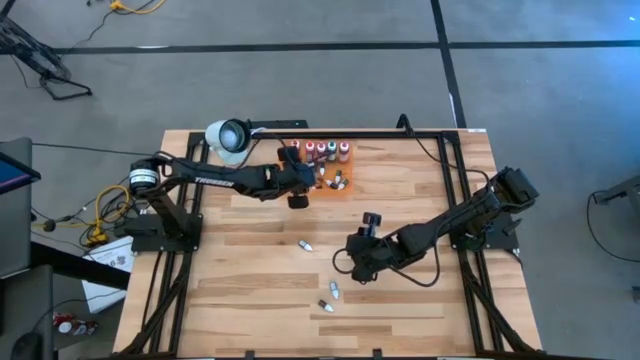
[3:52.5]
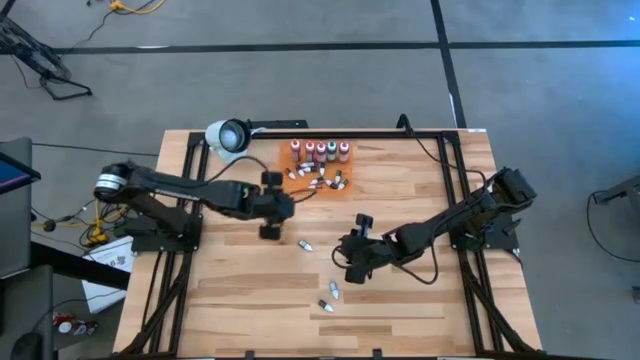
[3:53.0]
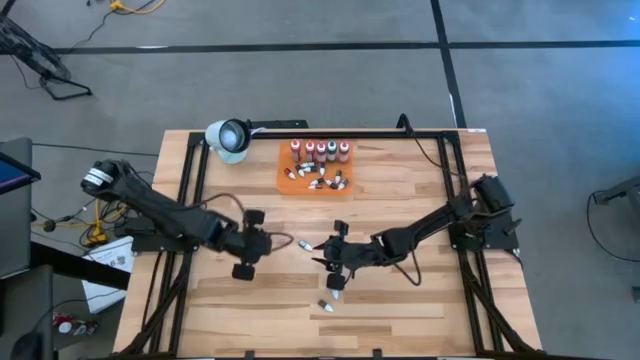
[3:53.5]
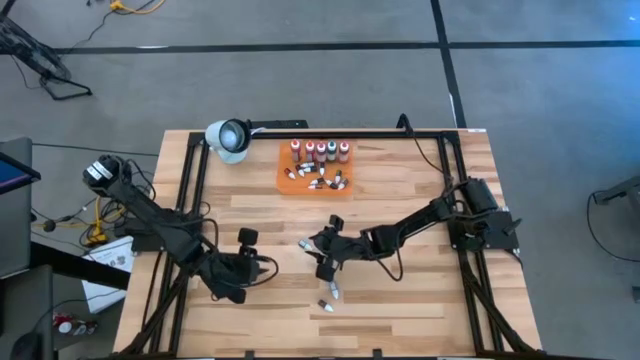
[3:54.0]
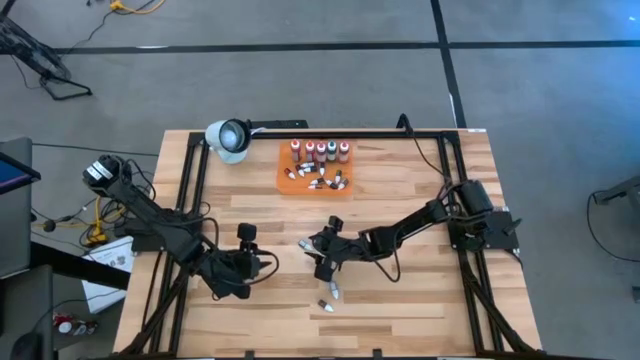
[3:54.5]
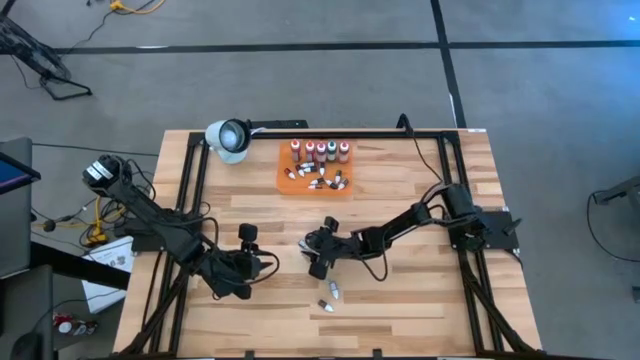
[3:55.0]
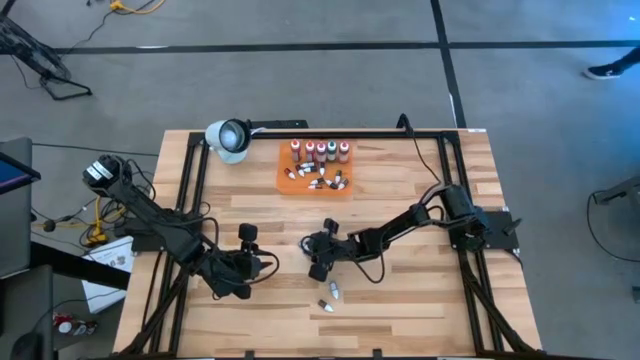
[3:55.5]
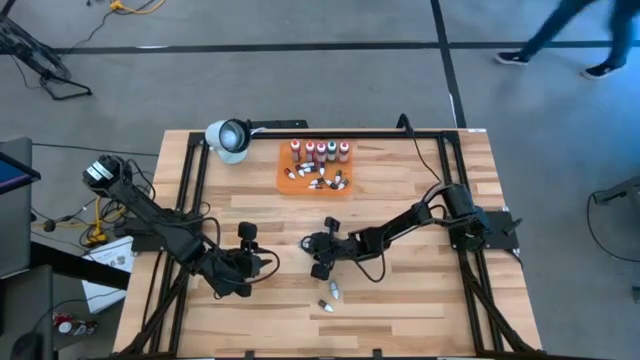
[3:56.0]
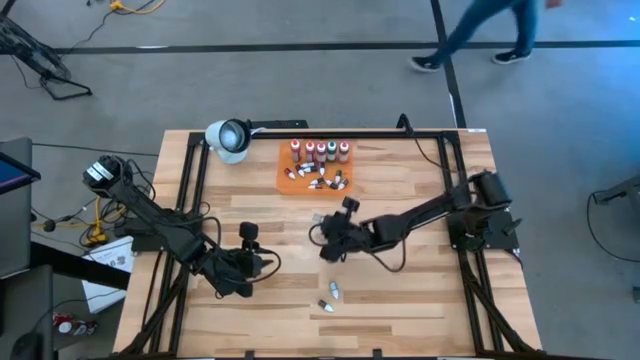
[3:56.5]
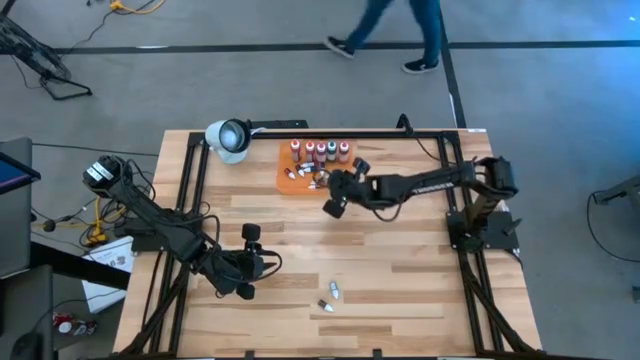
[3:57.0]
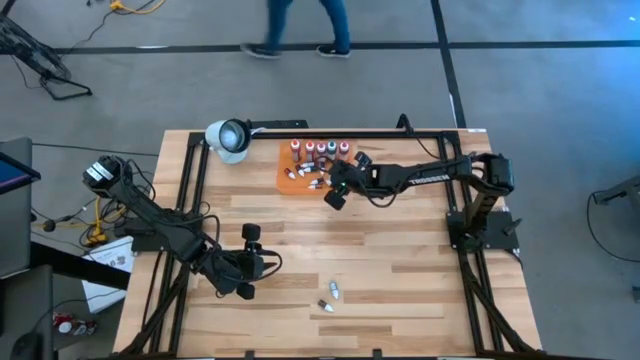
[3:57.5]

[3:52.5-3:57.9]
Task: Pick & Place food coloring
Put the small green food coloring bottle into the orange bin

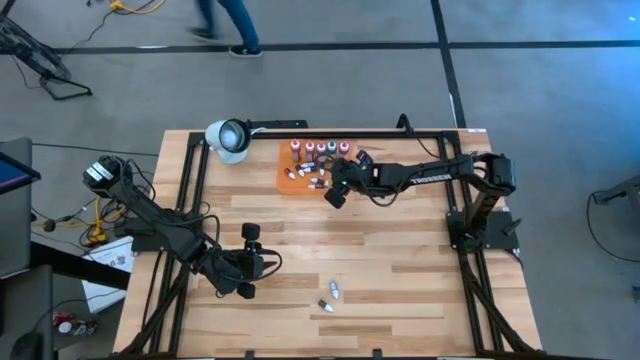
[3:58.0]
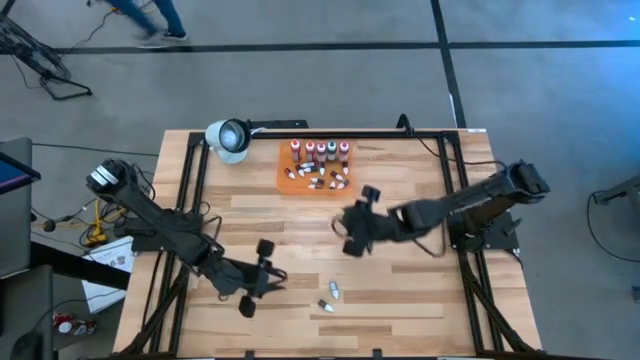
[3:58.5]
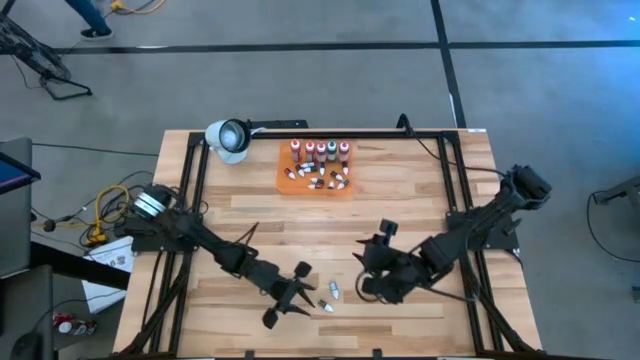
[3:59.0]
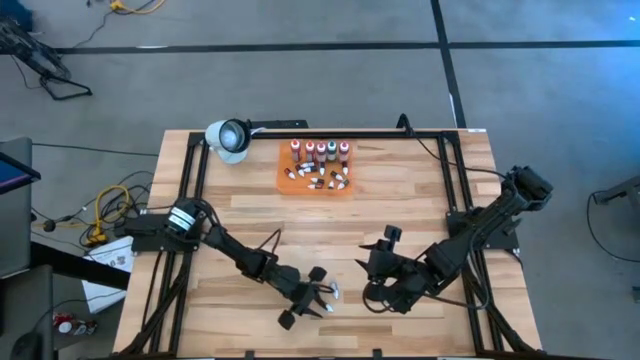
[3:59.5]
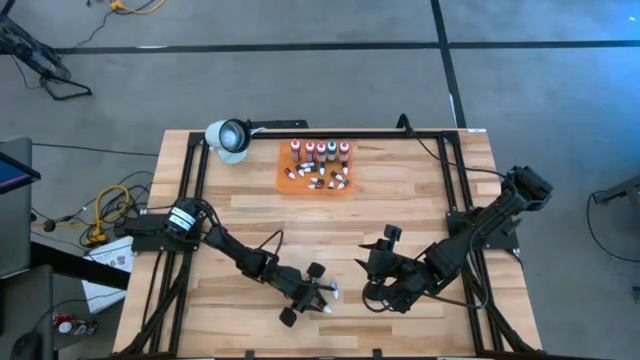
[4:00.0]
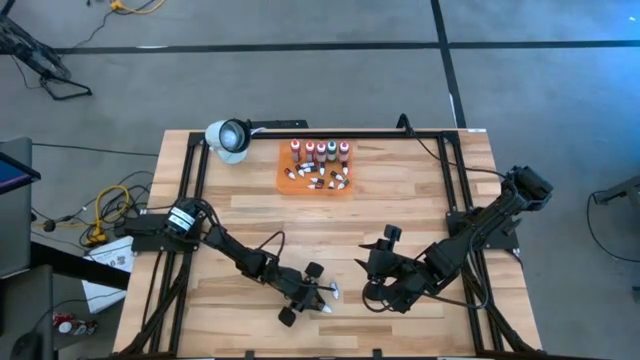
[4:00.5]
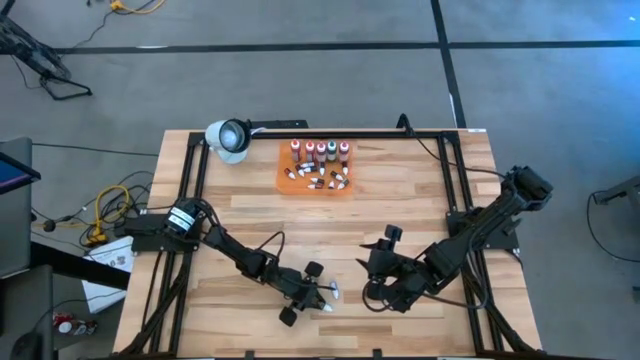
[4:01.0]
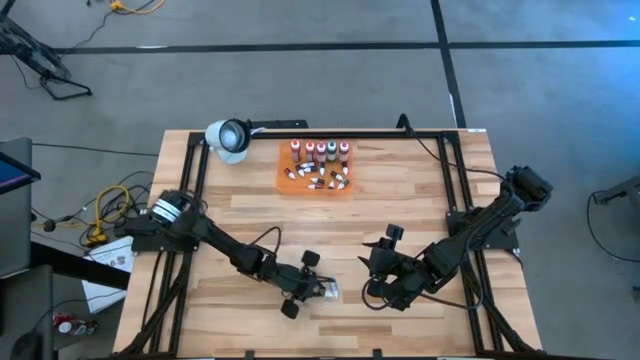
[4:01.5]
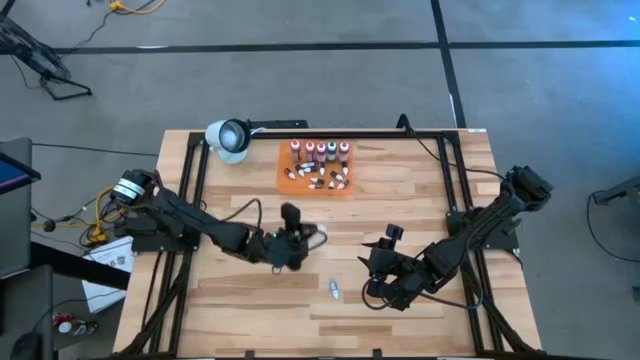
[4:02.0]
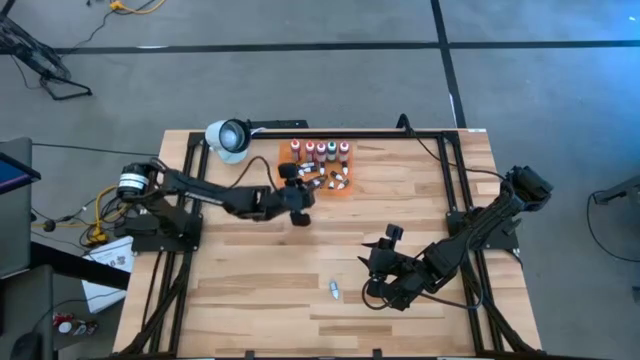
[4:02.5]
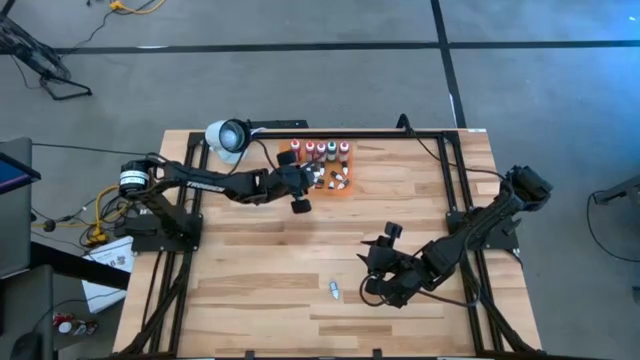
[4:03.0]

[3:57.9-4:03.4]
Put the small brown food coloring bottle into the orange bin

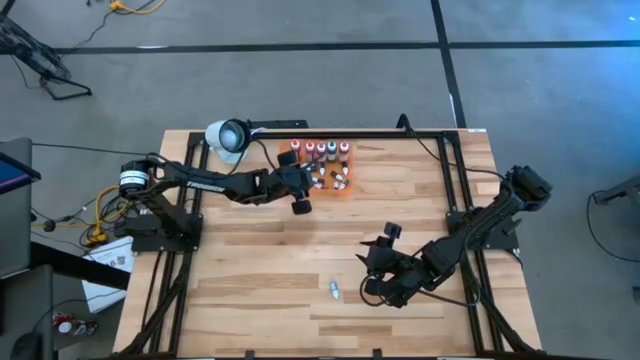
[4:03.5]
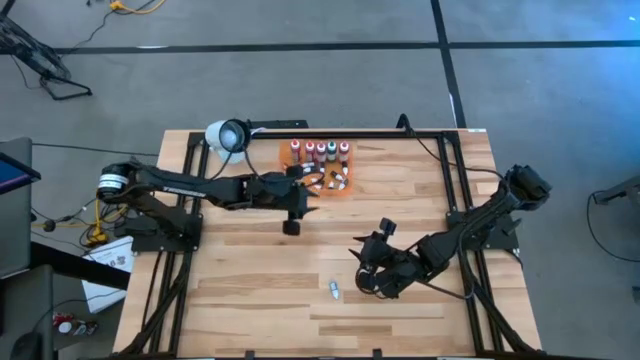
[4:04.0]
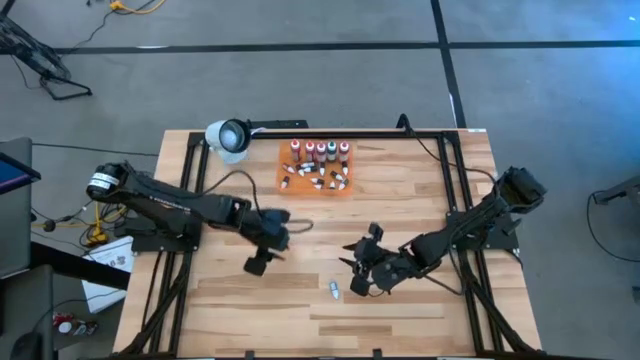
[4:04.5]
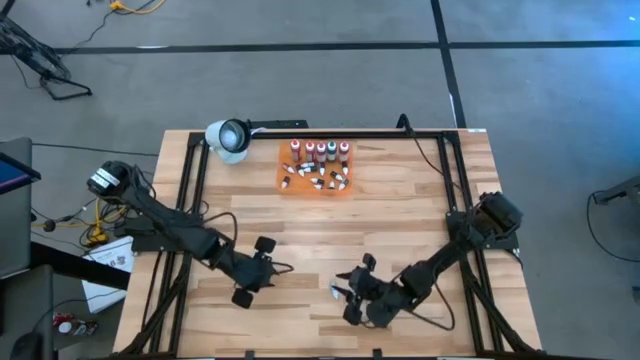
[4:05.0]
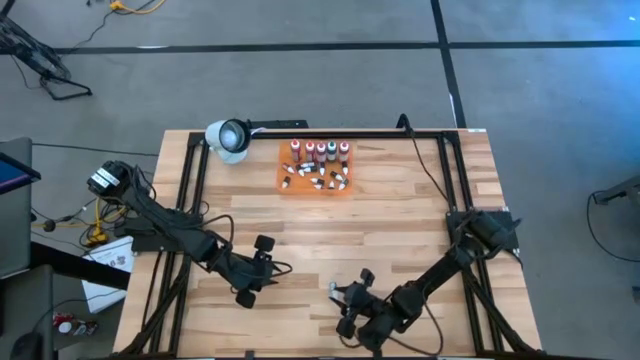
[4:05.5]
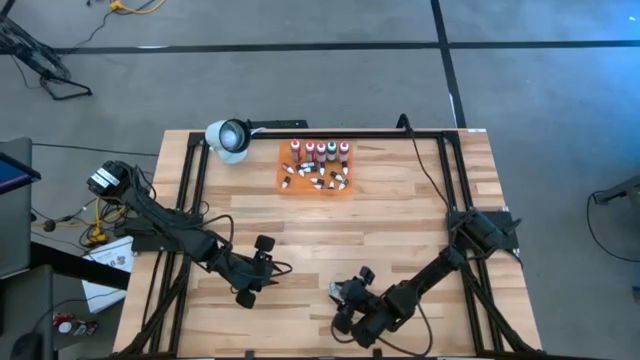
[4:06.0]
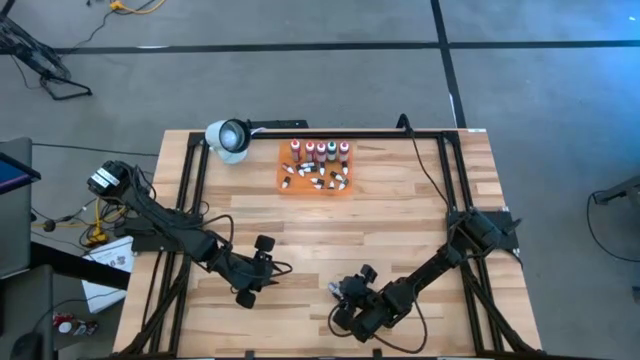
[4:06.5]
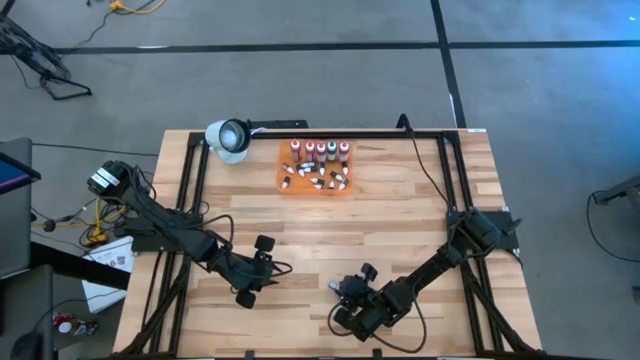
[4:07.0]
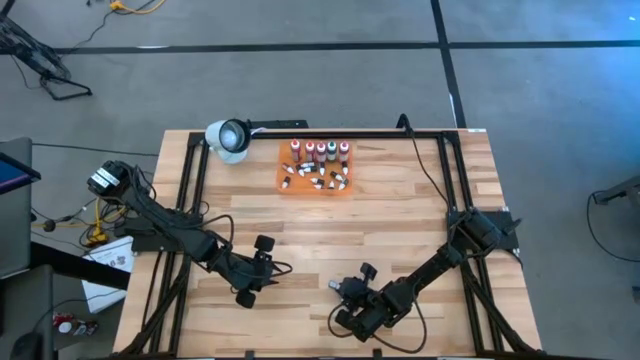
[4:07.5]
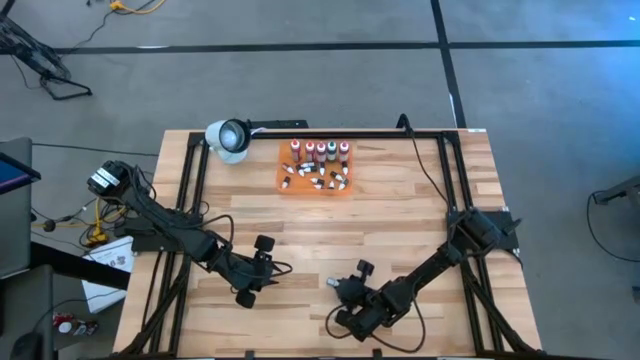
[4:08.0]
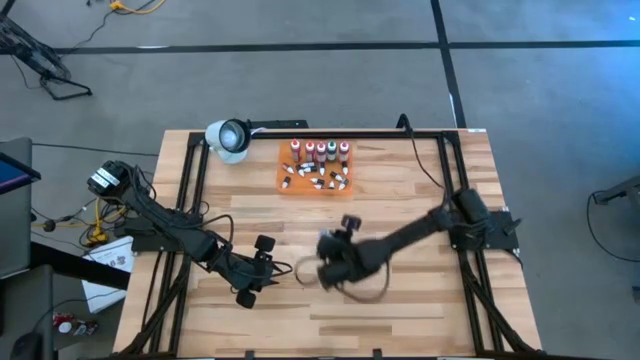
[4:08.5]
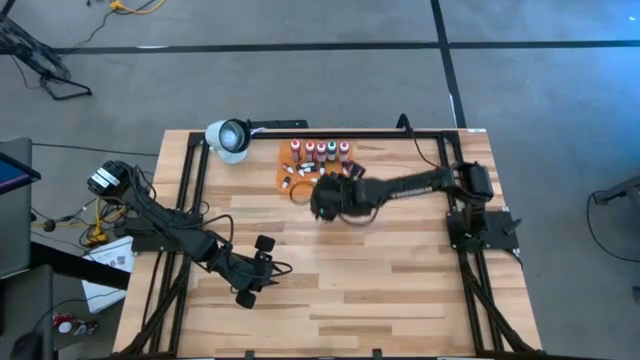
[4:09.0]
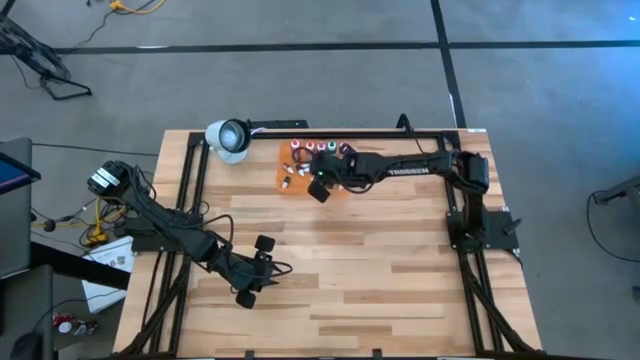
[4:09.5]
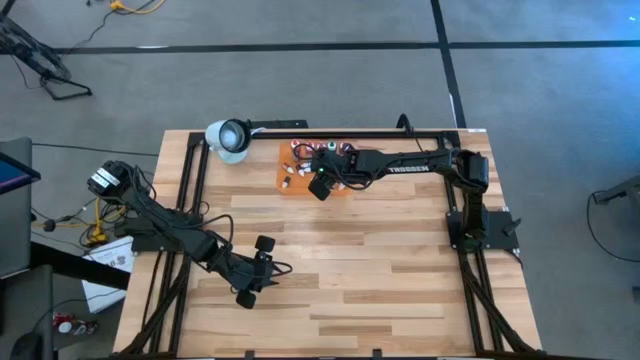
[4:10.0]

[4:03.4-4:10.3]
Put the small blue food coloring bottle into the orange bin

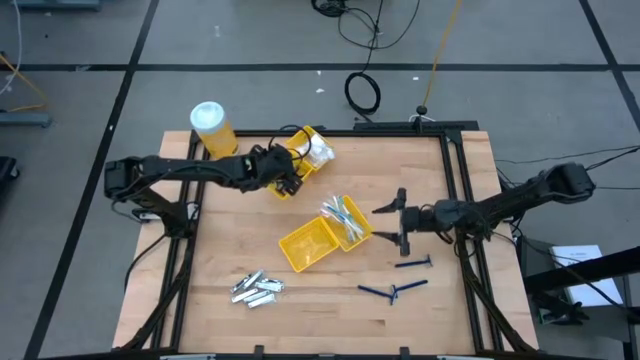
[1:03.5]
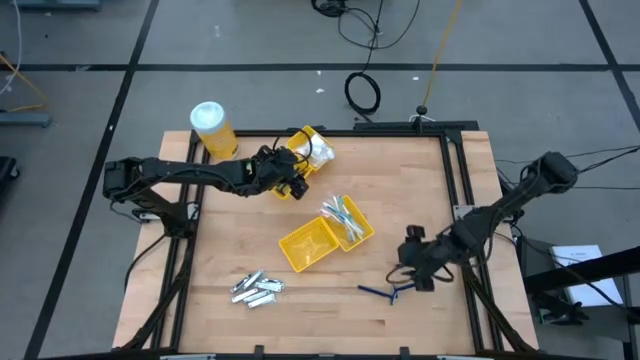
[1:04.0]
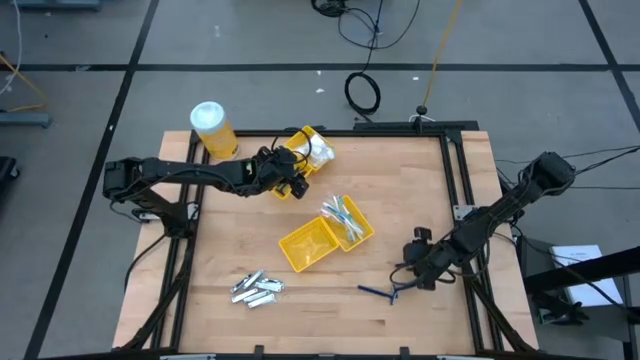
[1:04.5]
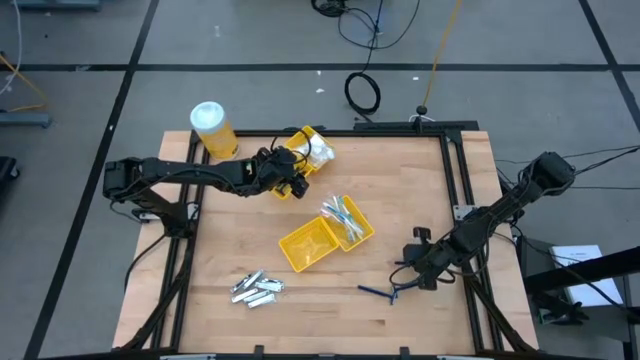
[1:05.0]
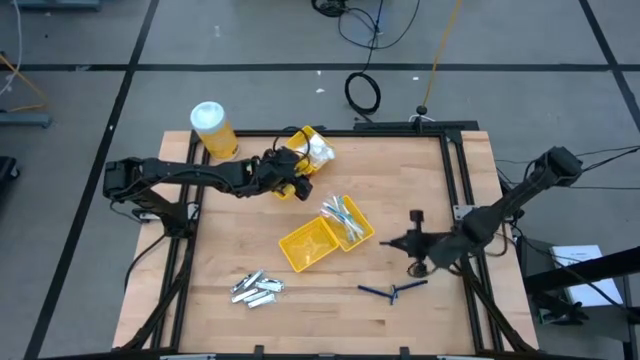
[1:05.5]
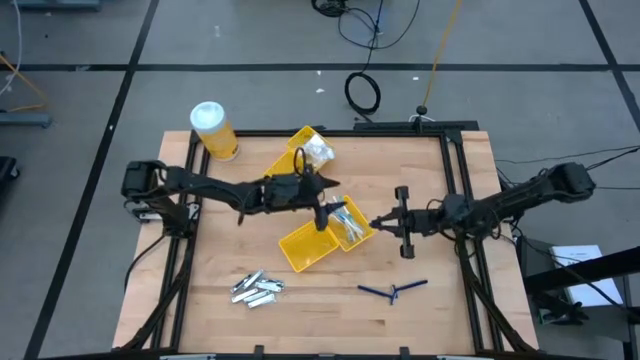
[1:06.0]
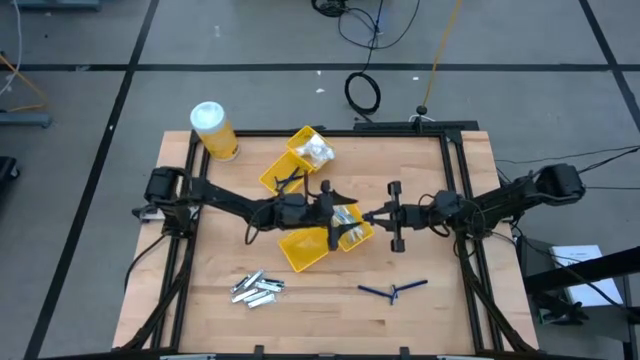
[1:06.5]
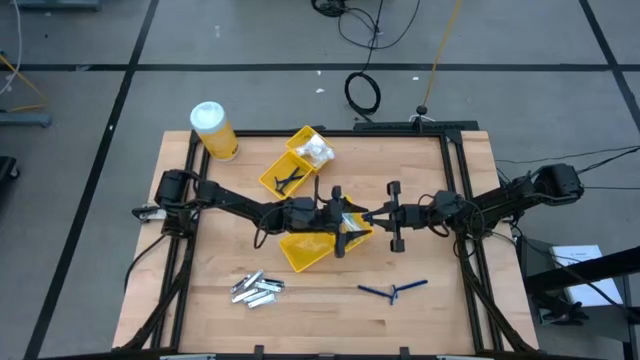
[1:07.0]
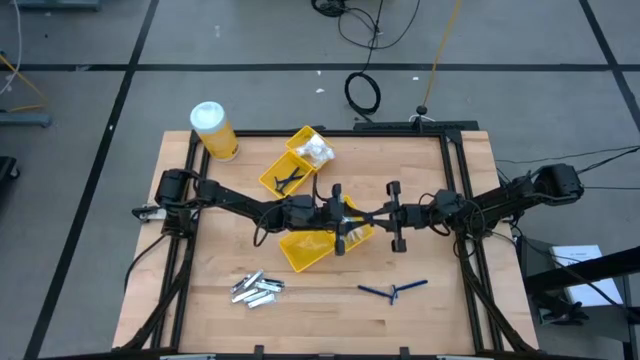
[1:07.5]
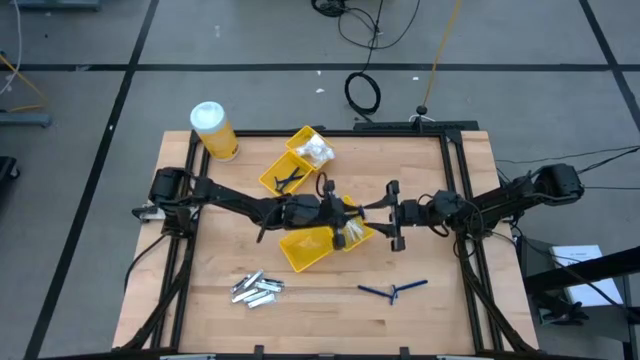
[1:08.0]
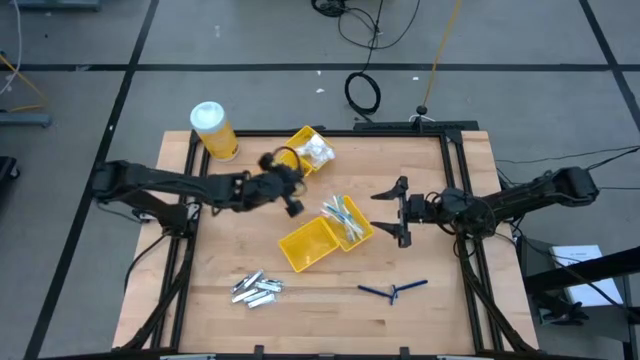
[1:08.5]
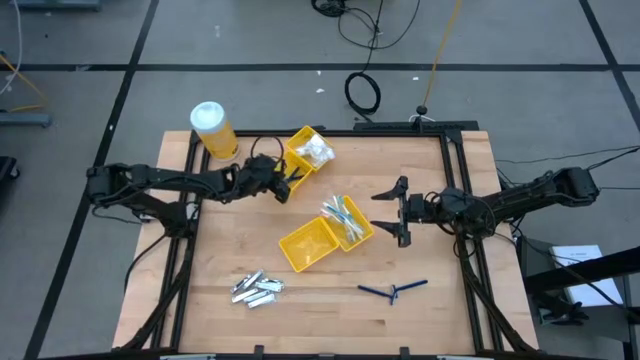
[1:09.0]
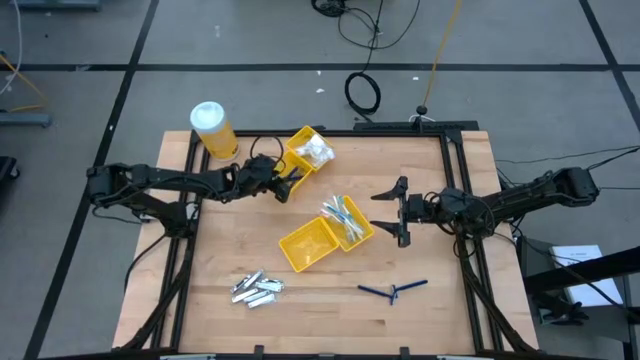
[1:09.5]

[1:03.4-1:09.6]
Task: Pick & Place Travel size toiletries
Put the blue razor into the bottom left yellow basket
